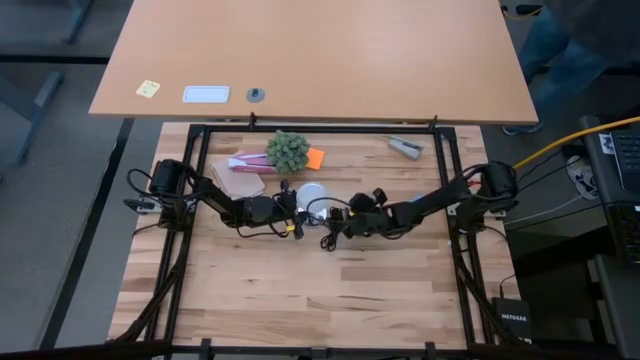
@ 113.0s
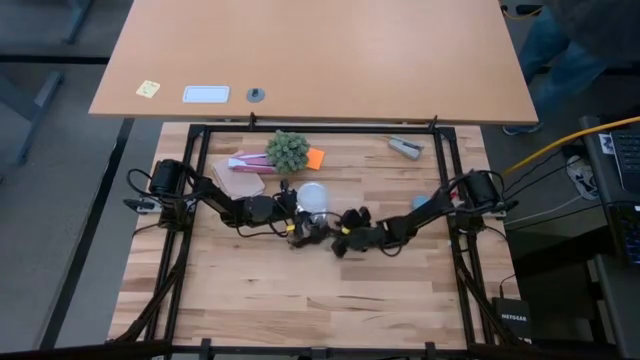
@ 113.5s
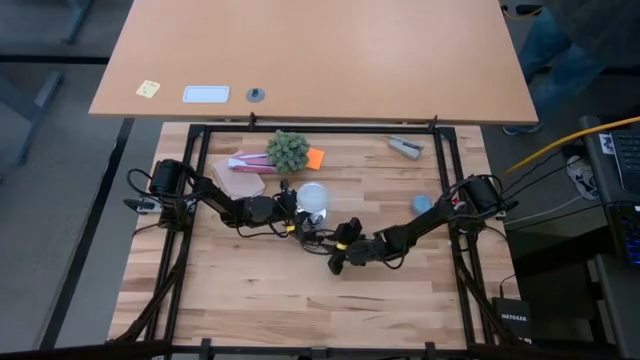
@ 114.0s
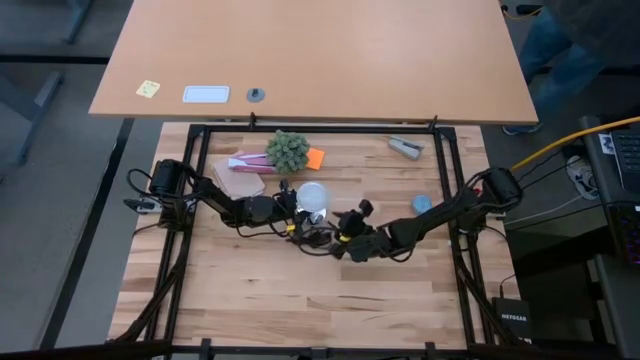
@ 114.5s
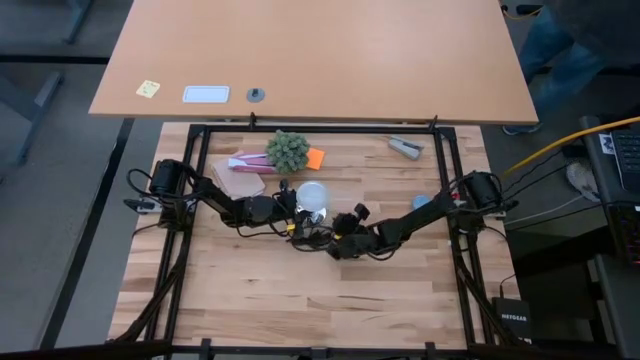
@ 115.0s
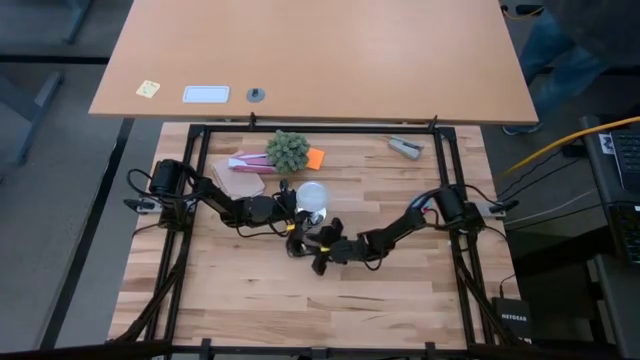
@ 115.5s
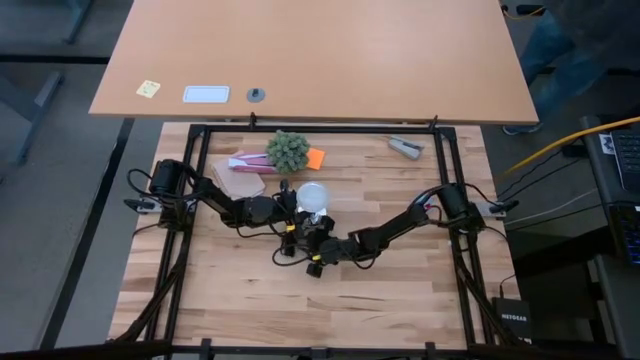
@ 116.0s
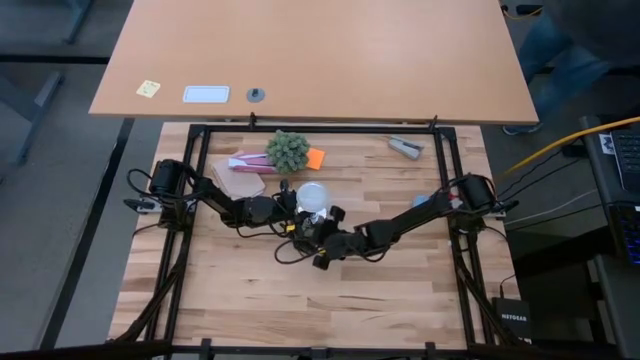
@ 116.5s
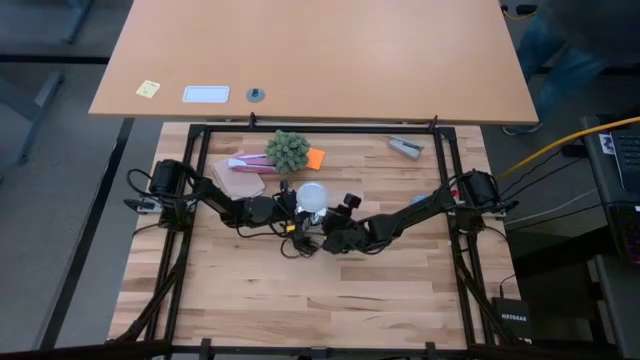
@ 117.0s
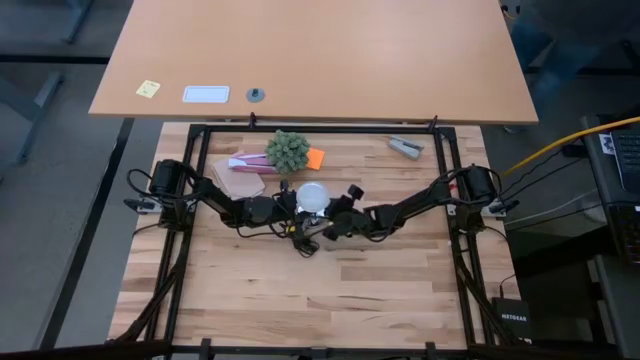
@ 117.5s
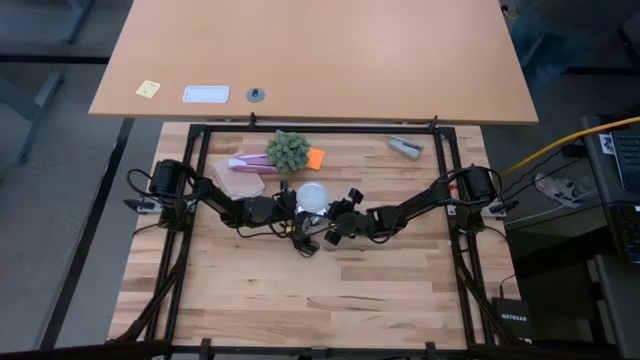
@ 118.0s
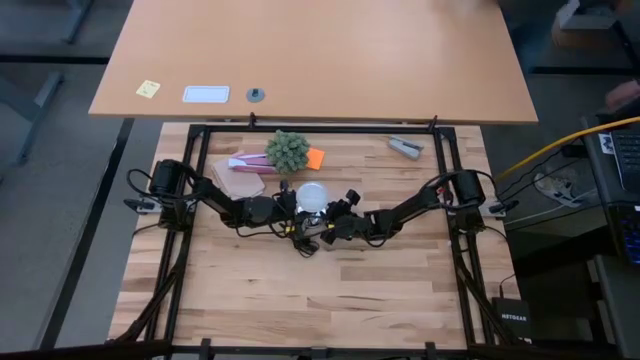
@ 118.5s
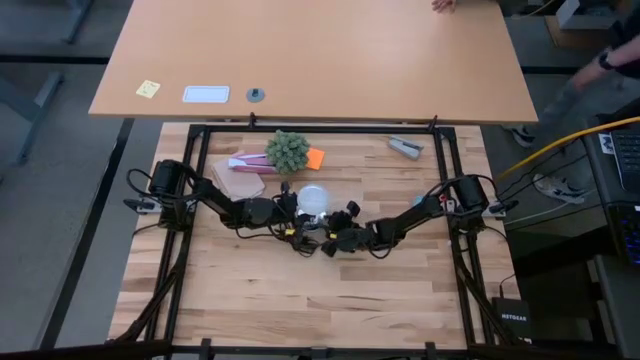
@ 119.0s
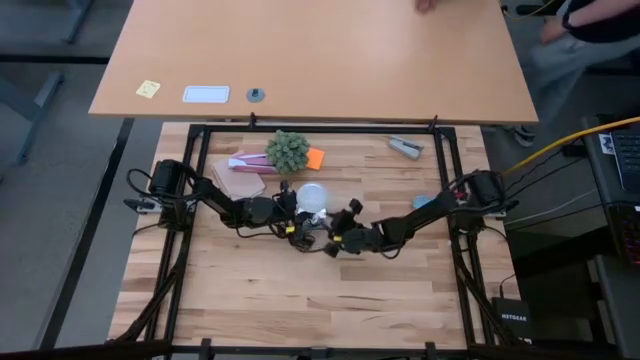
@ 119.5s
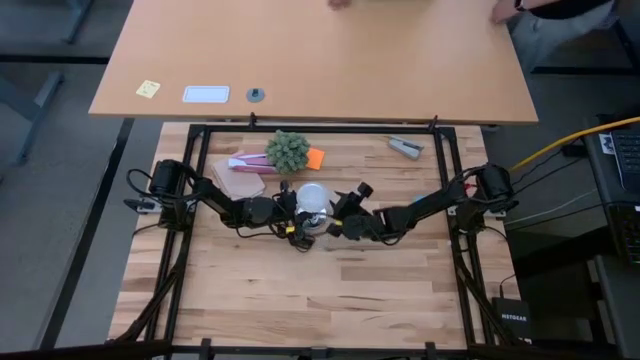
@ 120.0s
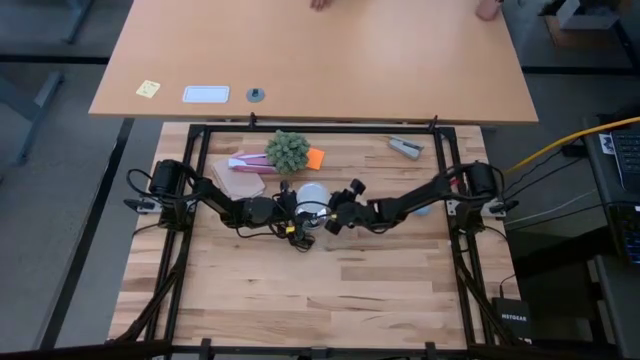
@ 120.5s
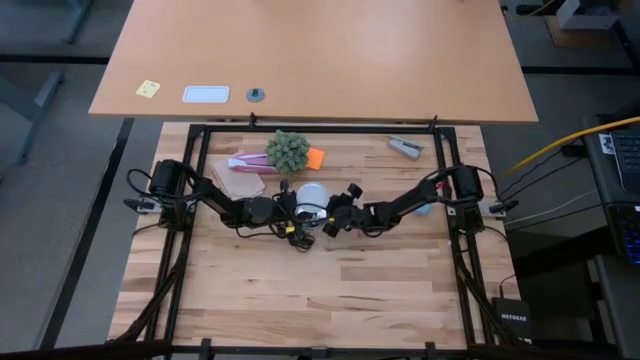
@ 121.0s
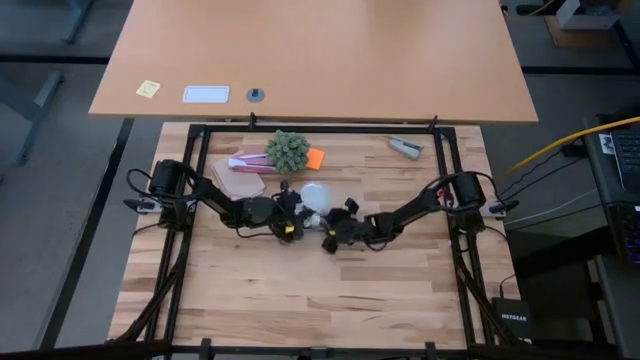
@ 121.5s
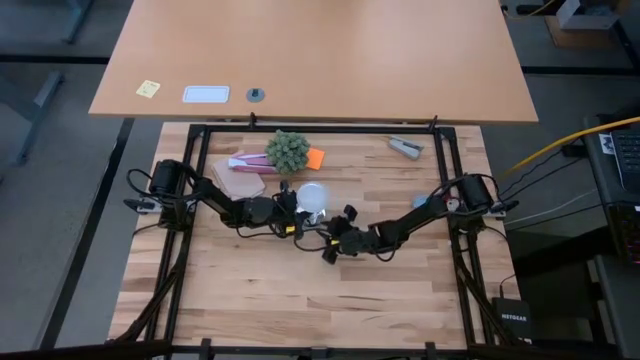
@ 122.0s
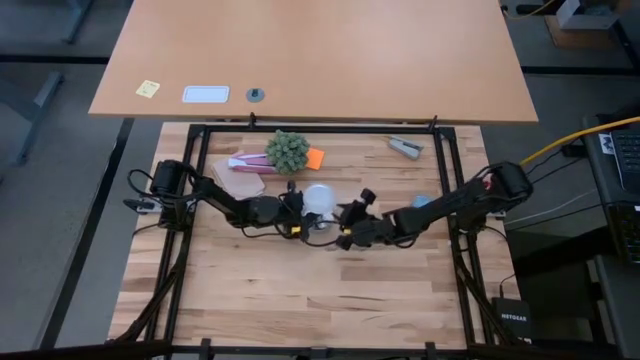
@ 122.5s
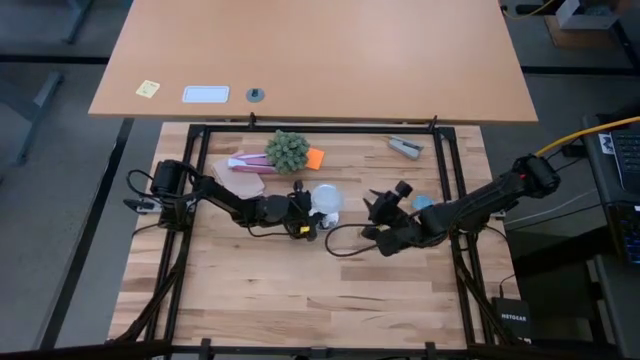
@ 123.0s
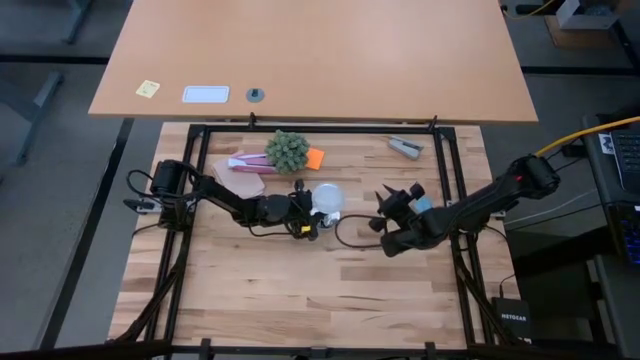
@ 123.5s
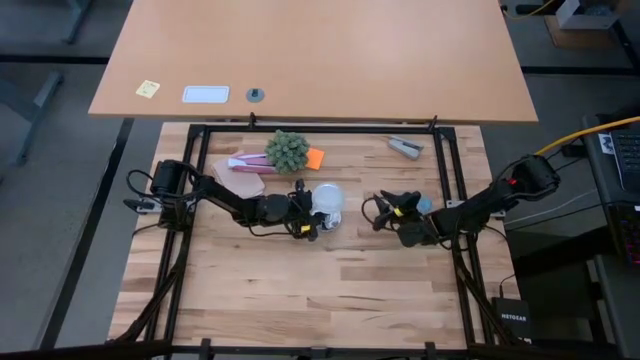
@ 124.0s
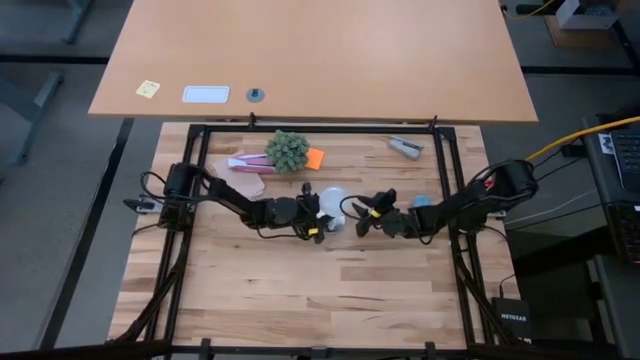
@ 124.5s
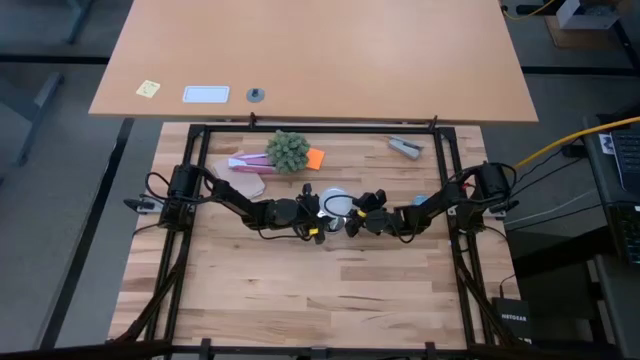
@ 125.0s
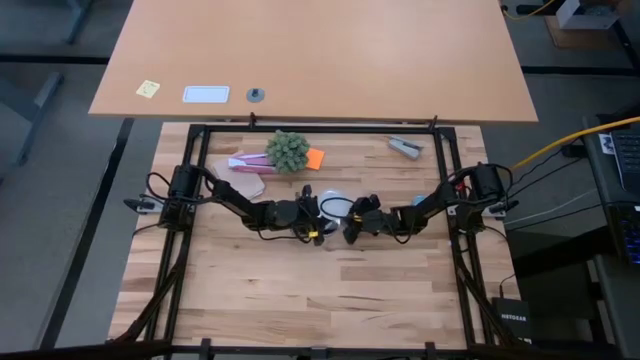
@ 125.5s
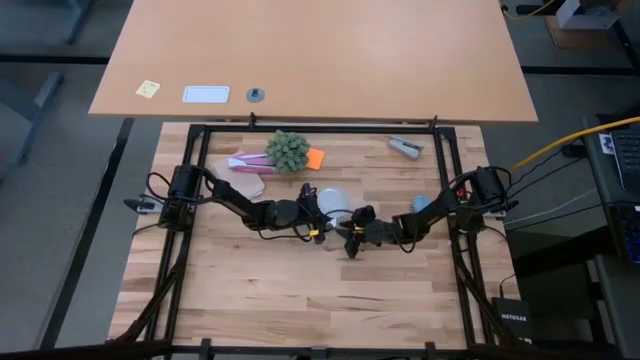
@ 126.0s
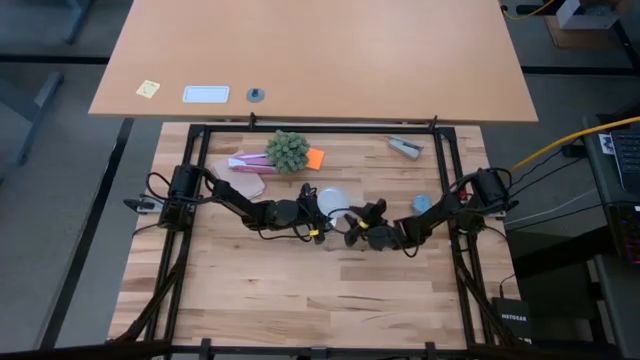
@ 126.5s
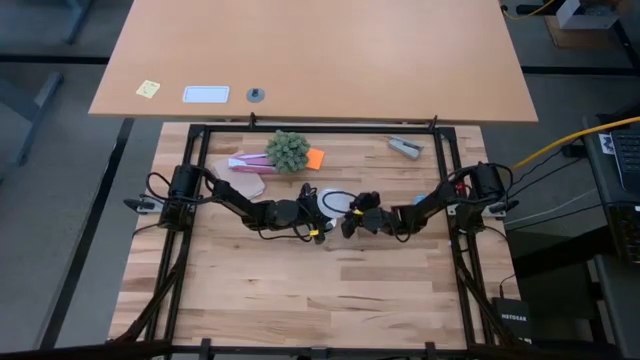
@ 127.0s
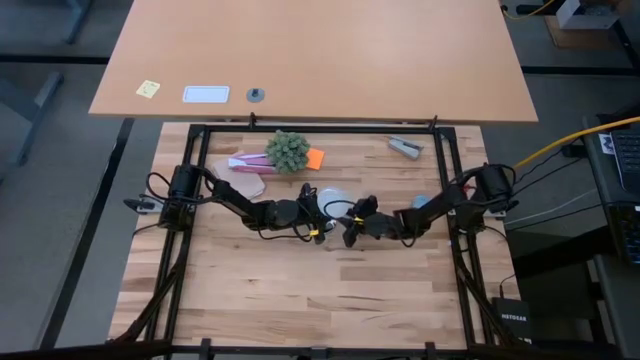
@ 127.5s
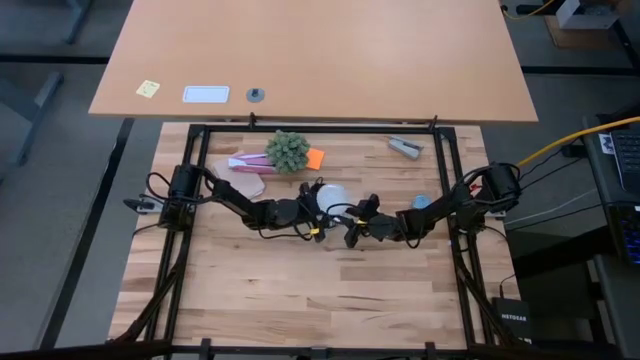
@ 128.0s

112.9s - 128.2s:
Task: Screw lightbulb
Remove the lightbulb from the lamp

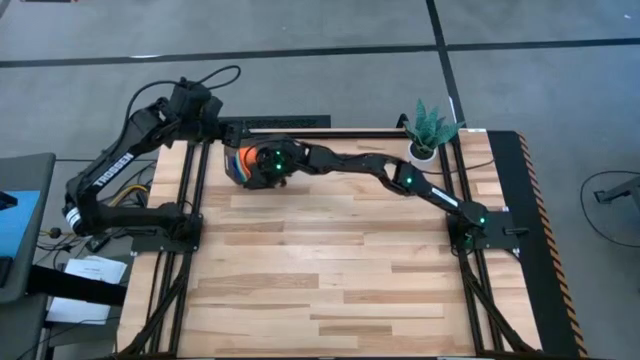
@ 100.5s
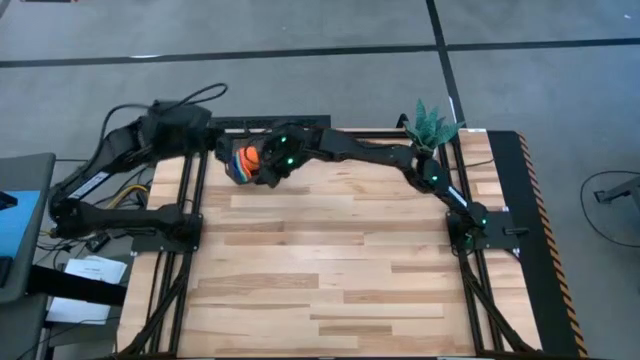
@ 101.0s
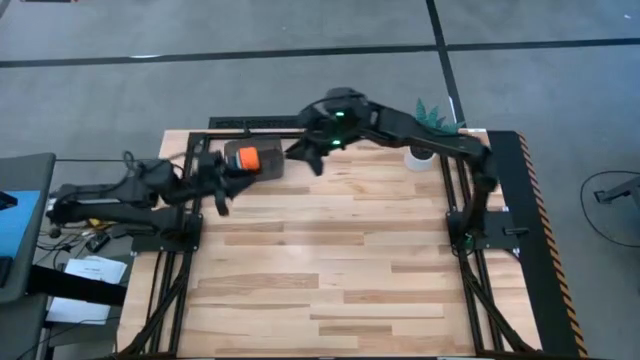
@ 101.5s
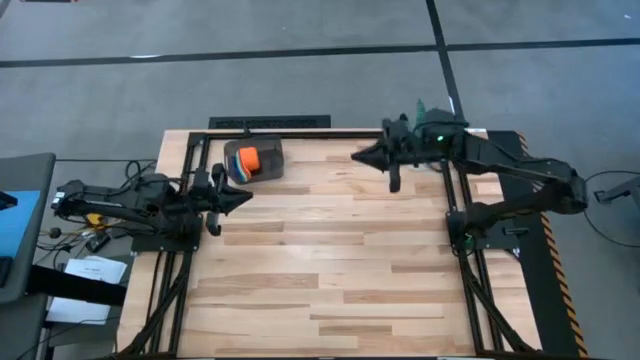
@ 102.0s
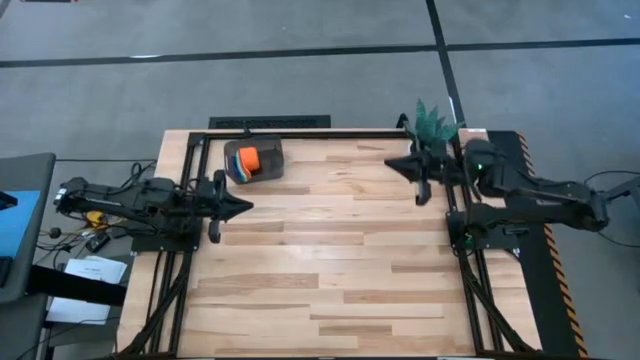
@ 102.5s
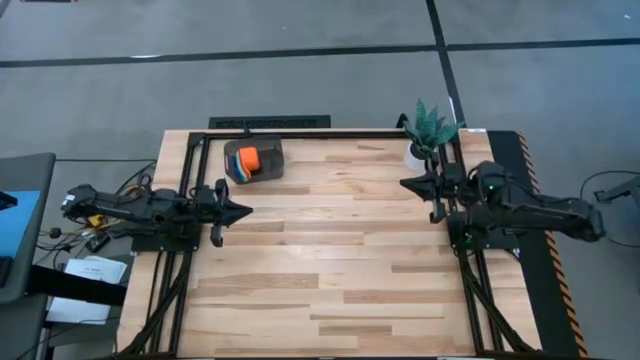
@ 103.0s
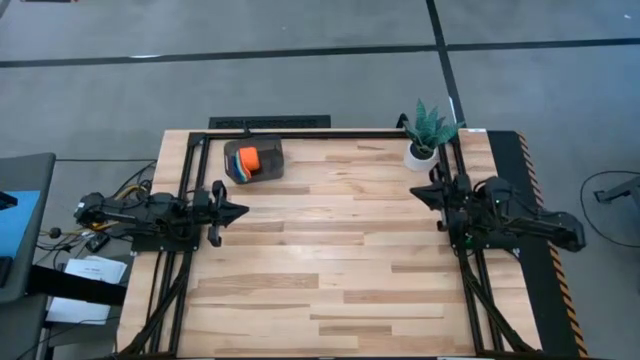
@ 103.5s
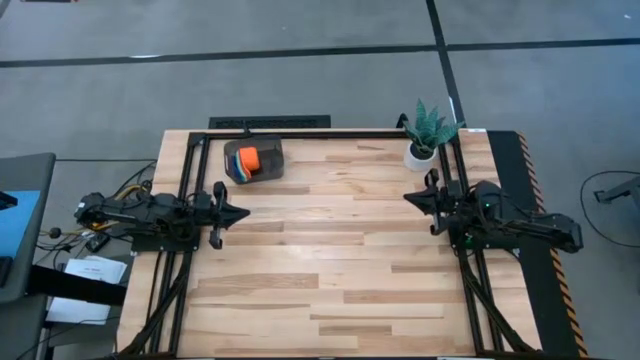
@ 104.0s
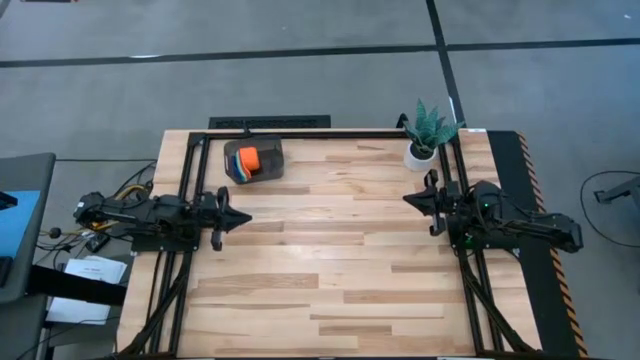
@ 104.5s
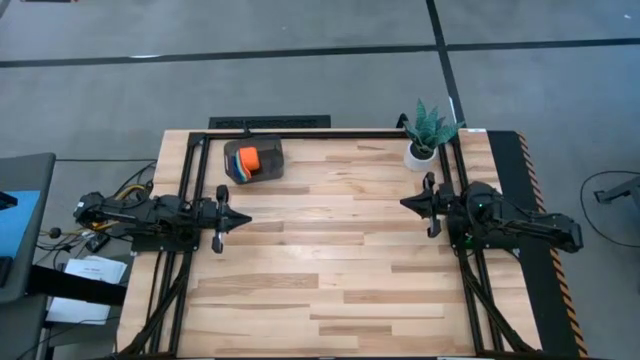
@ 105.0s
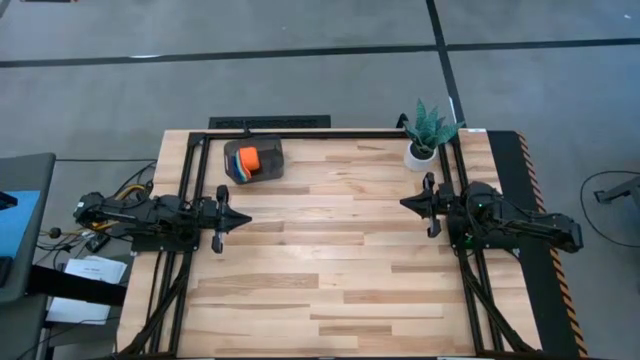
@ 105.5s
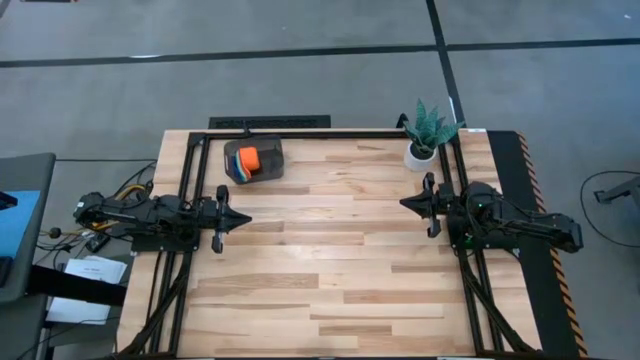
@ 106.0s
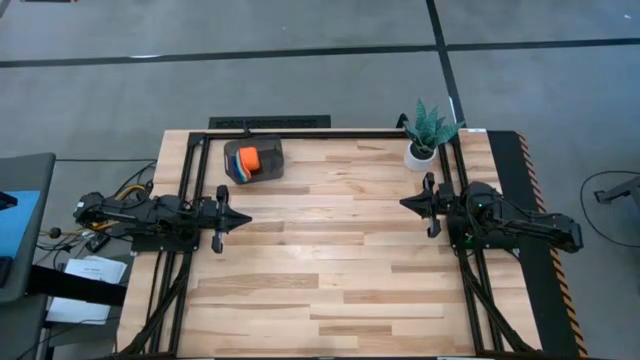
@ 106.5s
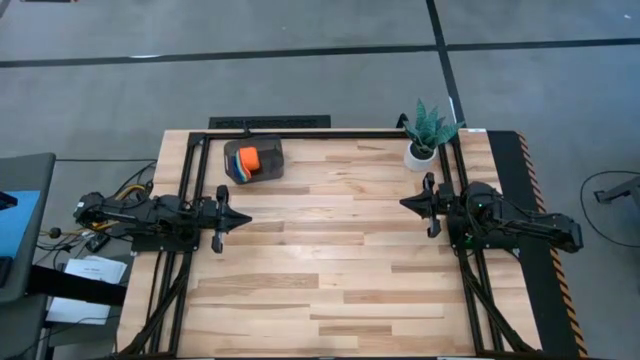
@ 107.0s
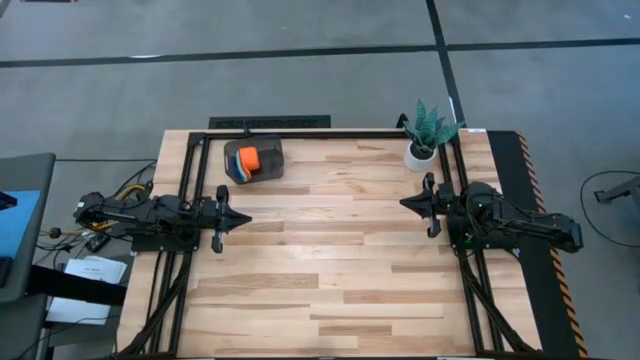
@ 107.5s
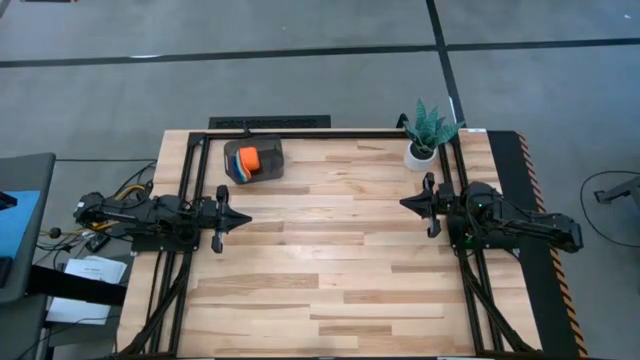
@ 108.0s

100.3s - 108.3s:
Task: Nest measuring cups in basket
Return to Home Position
